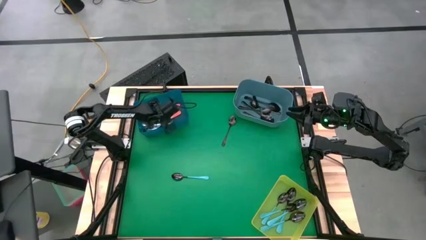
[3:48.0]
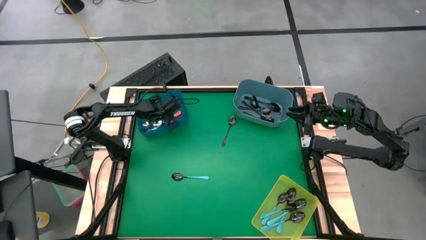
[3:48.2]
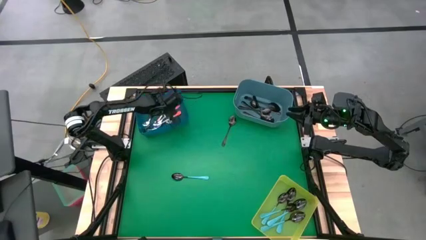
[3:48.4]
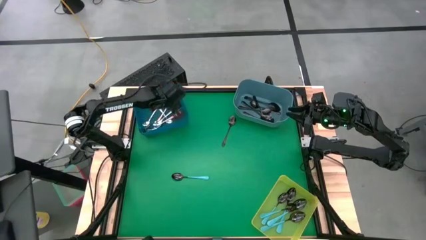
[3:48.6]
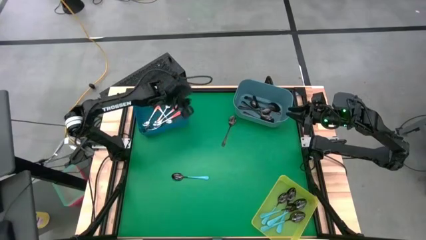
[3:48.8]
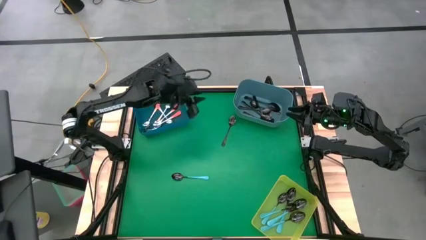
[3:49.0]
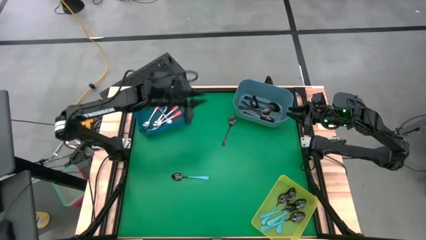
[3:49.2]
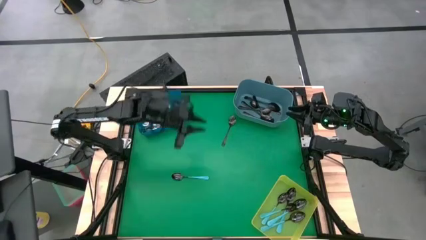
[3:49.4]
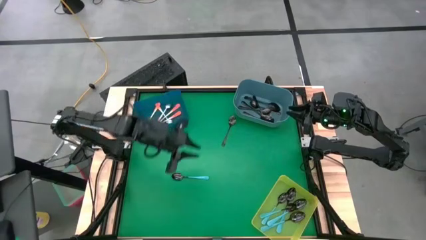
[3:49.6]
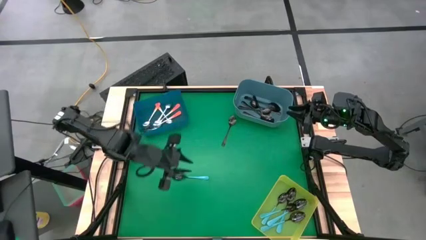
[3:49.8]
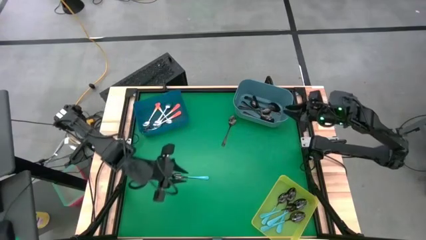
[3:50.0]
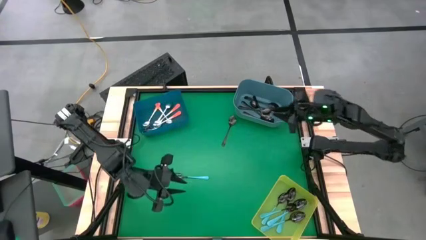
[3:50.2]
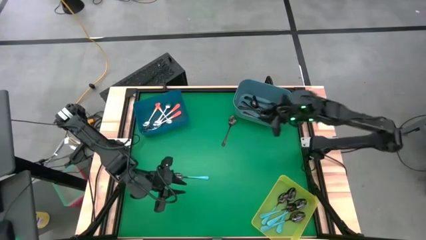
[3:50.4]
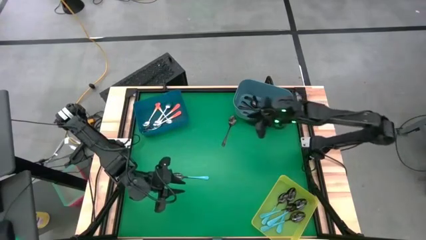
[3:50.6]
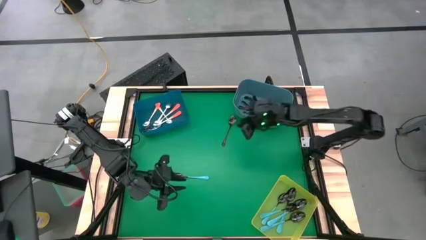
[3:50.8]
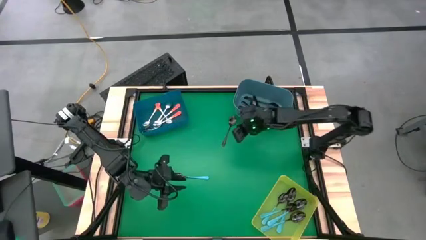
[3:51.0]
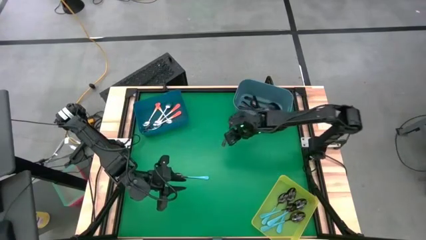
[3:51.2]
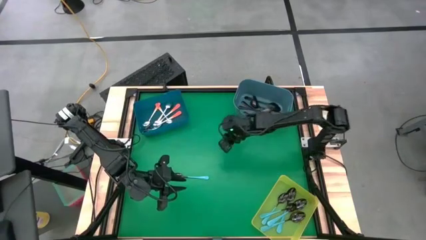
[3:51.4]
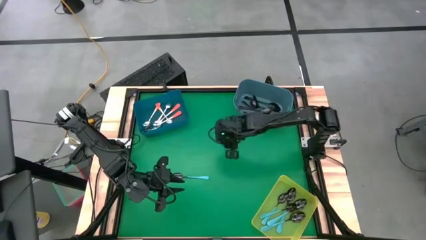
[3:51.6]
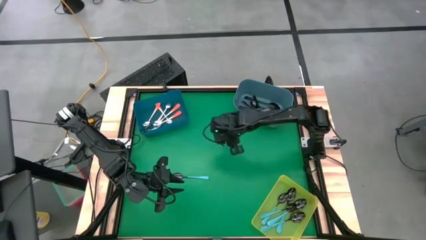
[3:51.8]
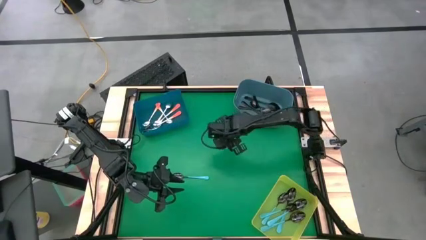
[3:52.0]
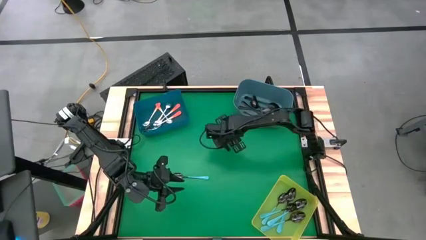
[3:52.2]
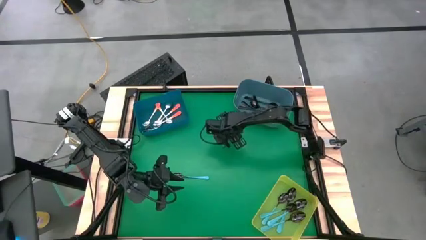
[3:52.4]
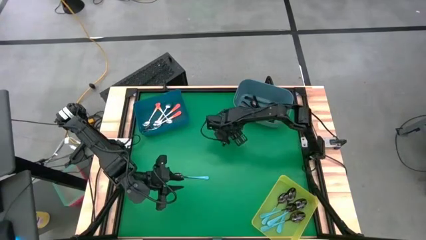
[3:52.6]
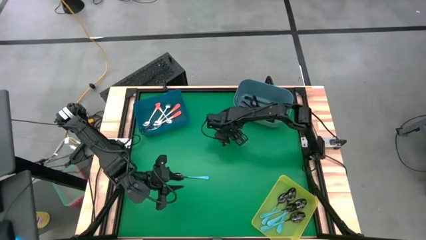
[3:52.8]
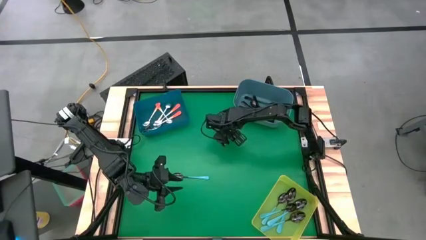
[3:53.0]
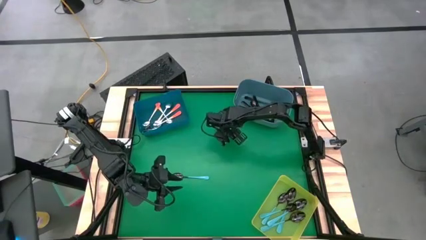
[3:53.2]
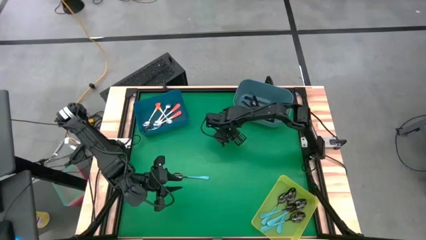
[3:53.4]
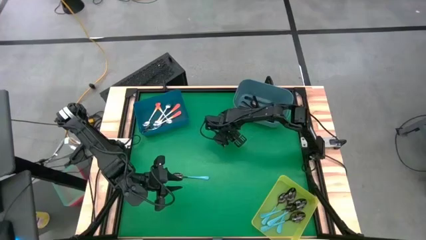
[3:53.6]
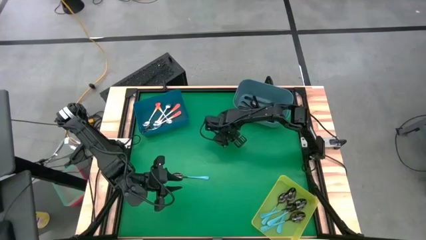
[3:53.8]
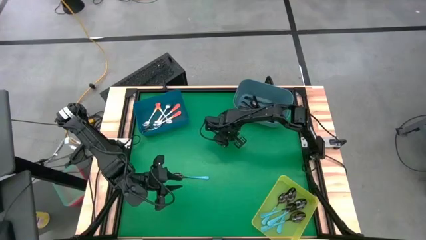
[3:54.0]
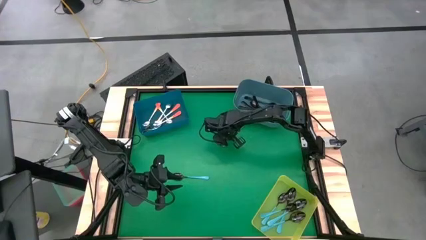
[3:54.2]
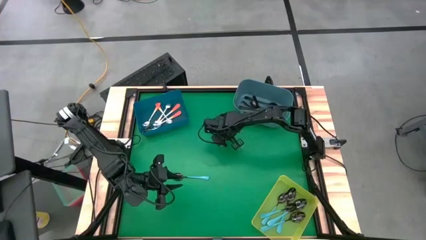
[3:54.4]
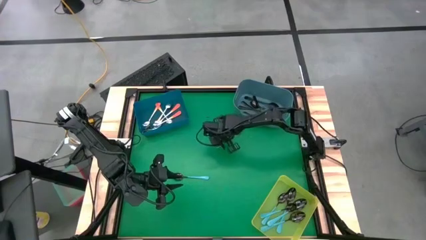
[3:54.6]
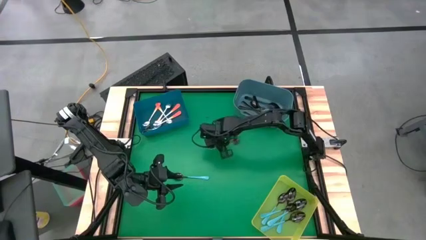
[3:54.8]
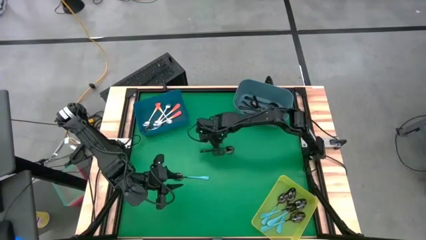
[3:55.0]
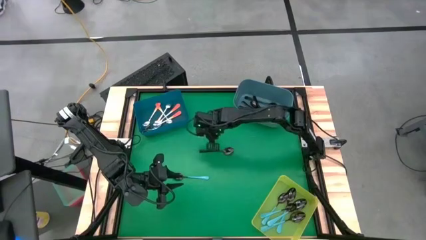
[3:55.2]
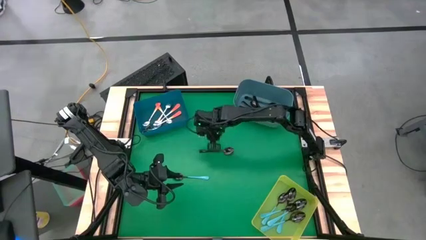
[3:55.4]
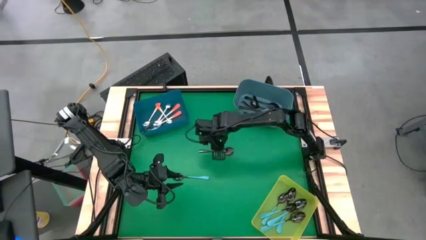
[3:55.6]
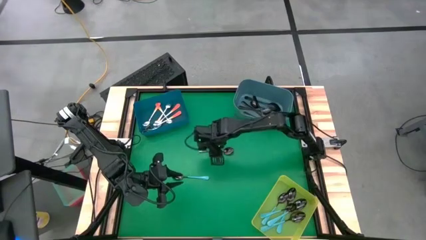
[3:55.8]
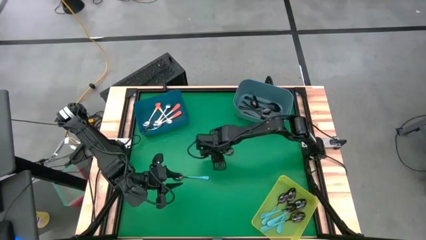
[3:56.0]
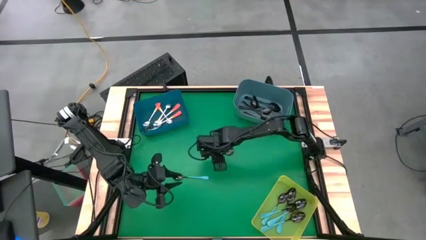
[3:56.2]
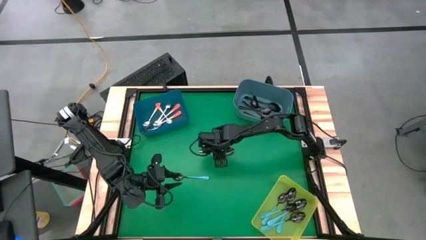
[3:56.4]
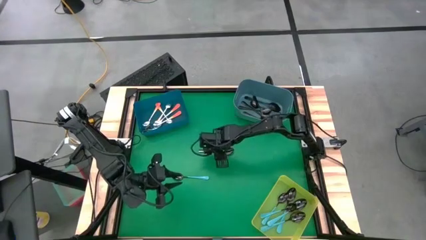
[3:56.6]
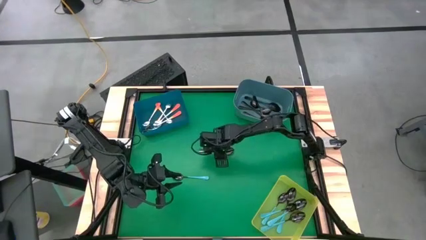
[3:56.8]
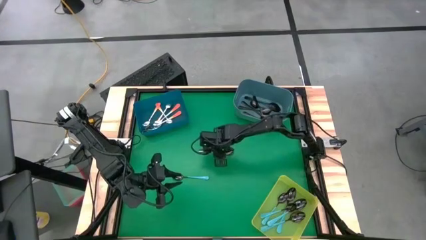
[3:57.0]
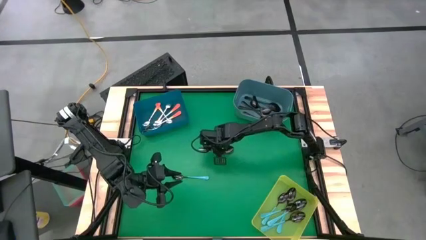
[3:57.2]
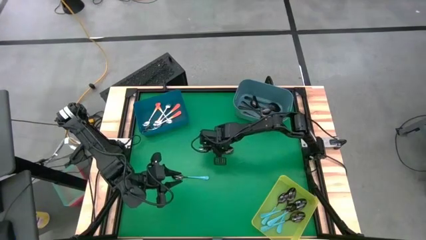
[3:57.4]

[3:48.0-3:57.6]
Task: Sort silverware by color (type)
Put the black spoon into the blue bin

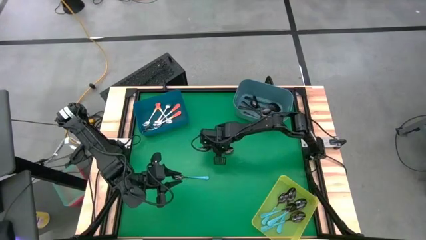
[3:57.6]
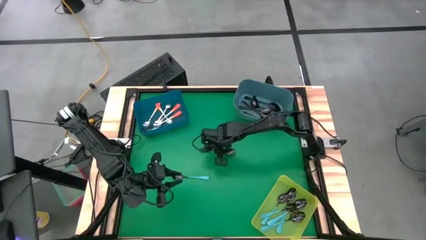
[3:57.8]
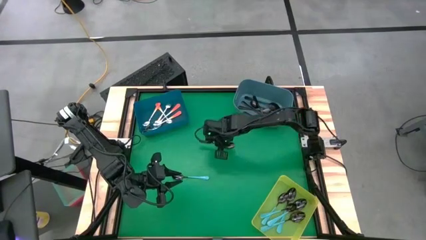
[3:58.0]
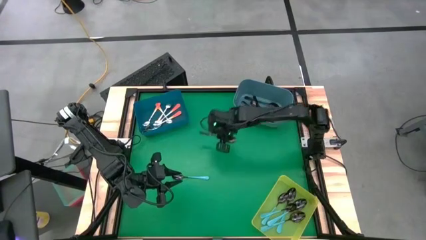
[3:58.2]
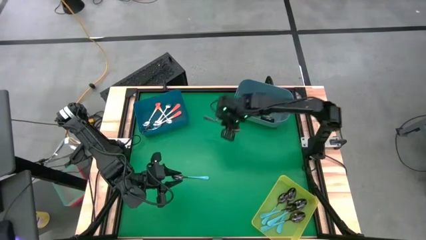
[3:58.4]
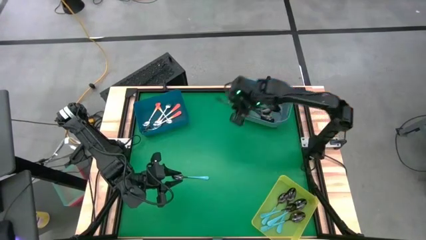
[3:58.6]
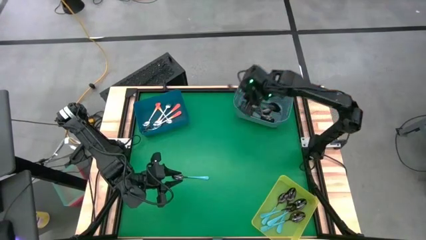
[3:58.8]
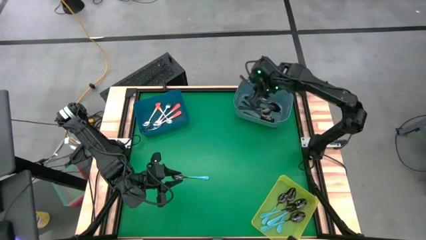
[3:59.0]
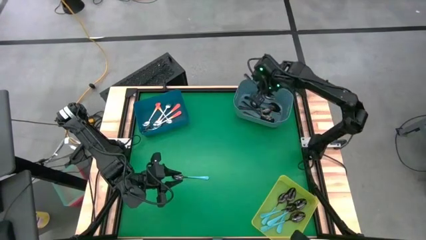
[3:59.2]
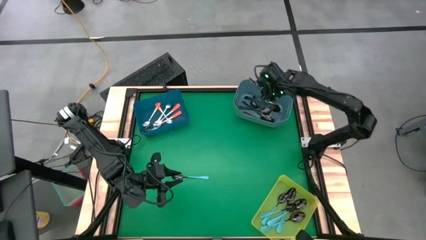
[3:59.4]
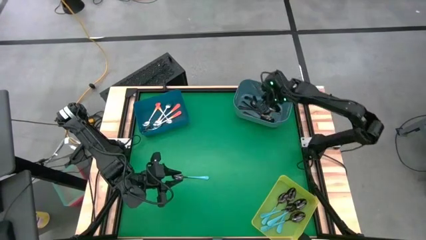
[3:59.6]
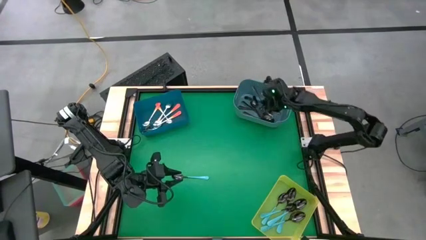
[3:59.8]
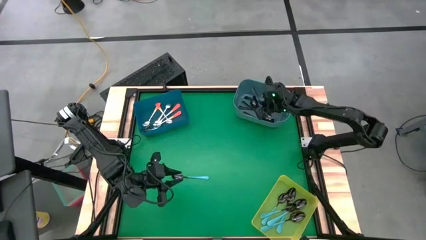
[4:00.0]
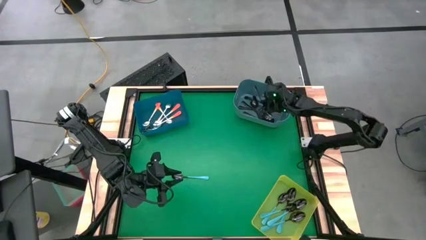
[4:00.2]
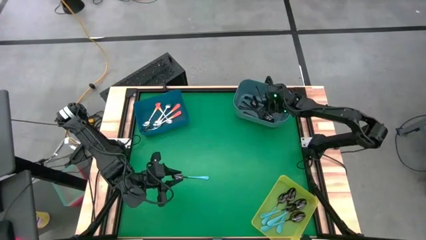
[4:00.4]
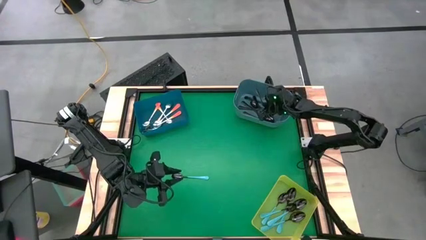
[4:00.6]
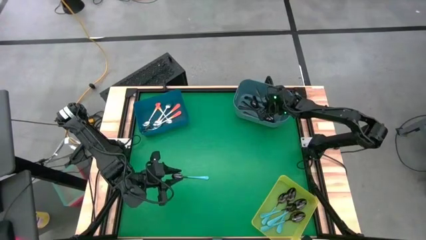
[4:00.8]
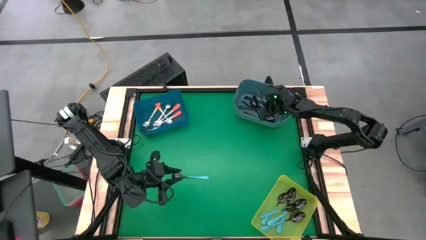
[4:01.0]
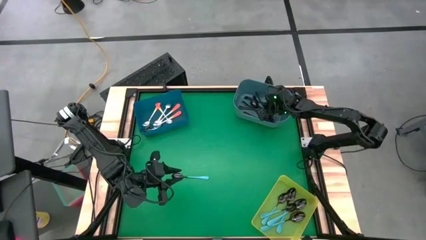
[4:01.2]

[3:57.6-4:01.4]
Put the black spoon into the blue bin
